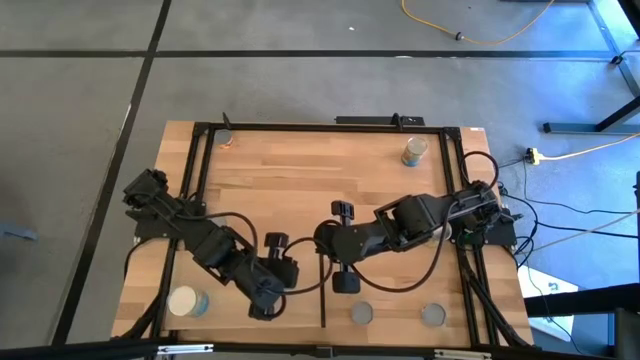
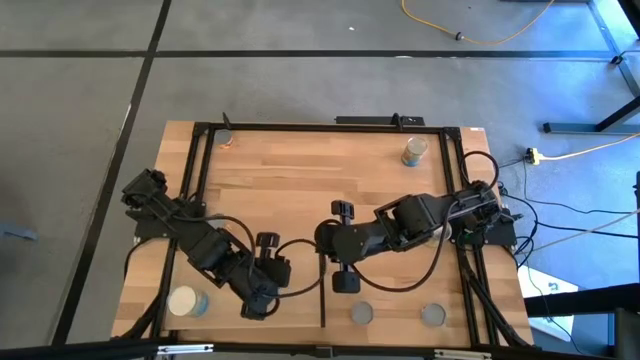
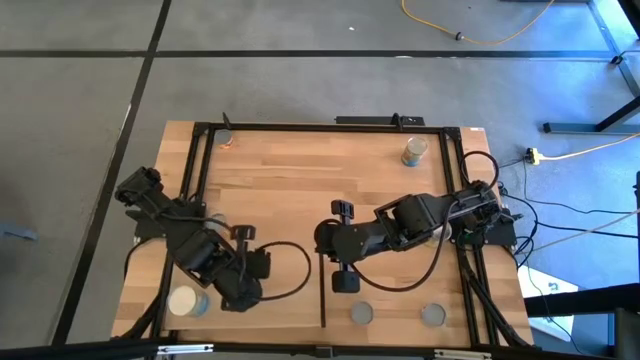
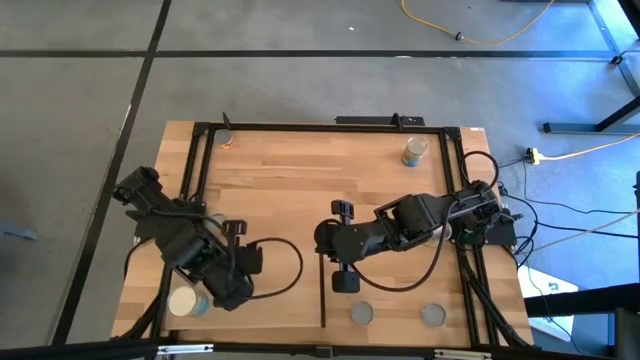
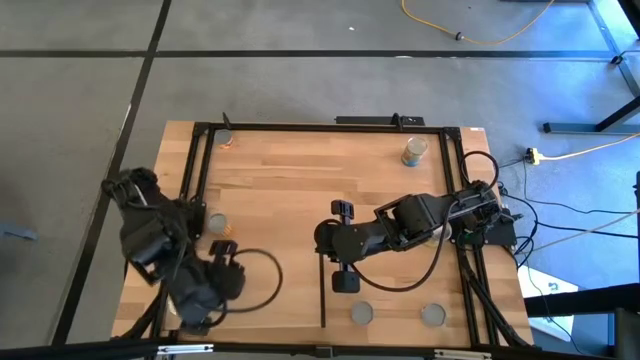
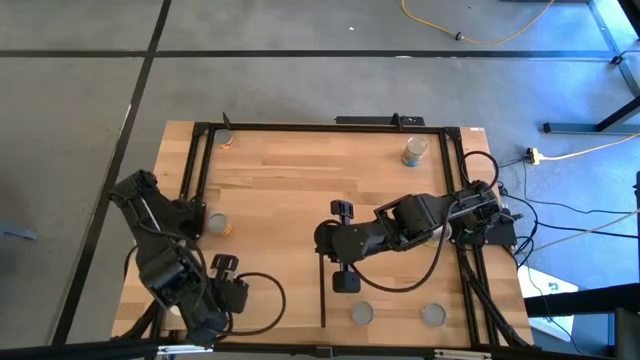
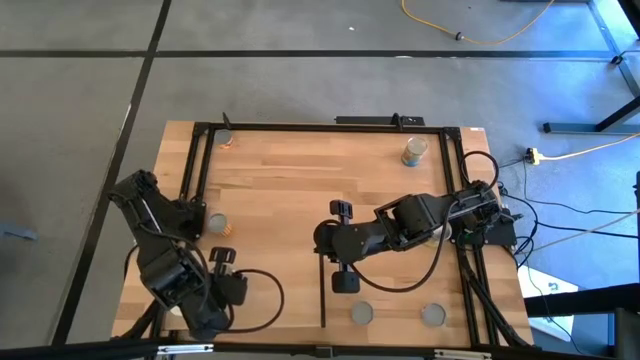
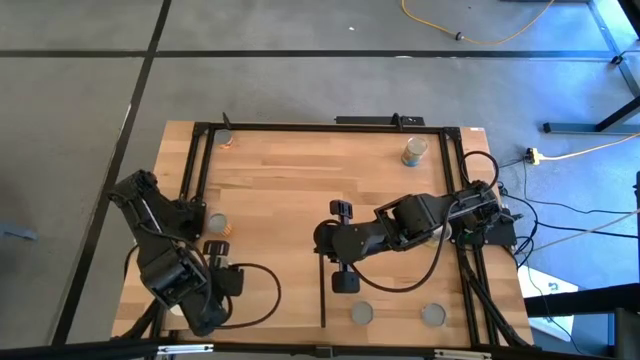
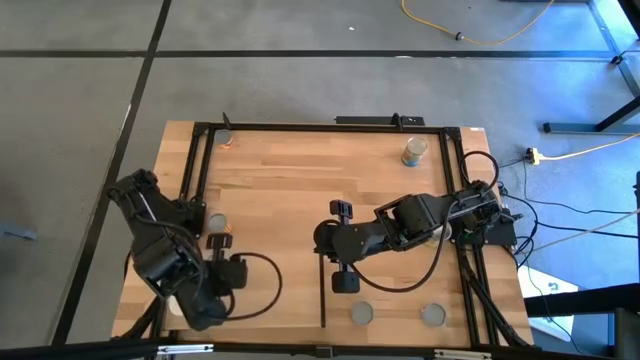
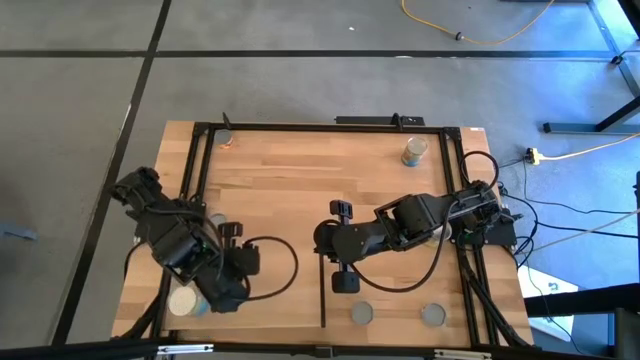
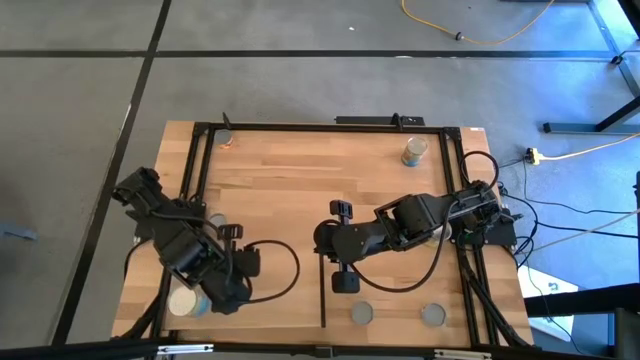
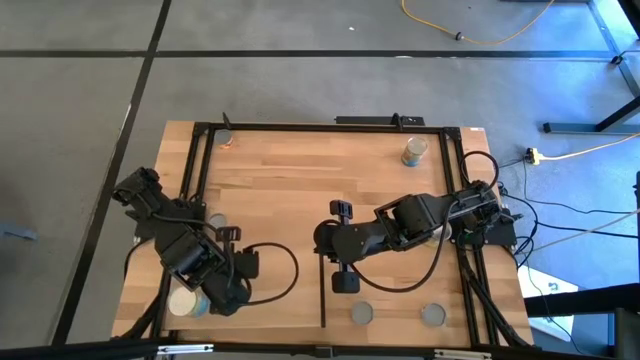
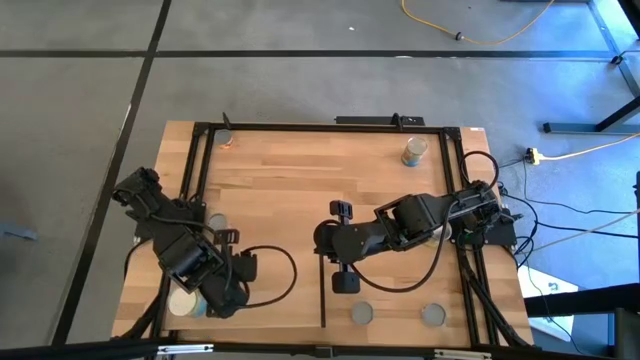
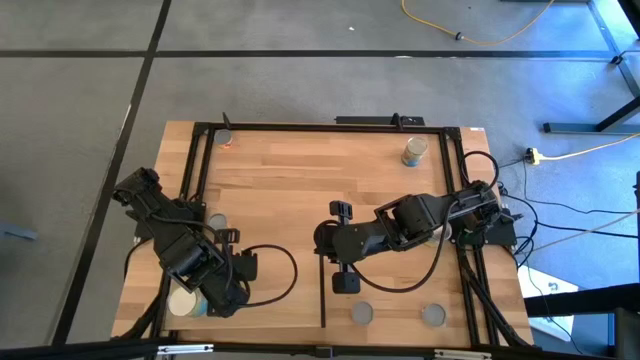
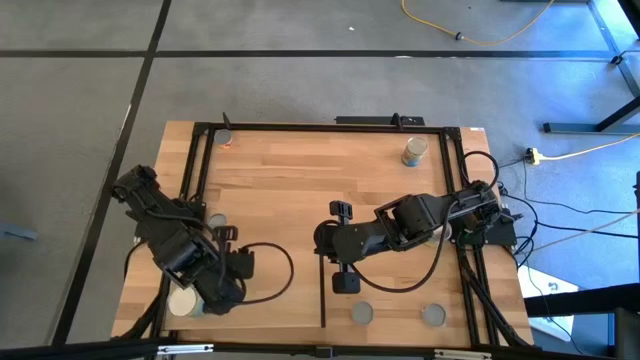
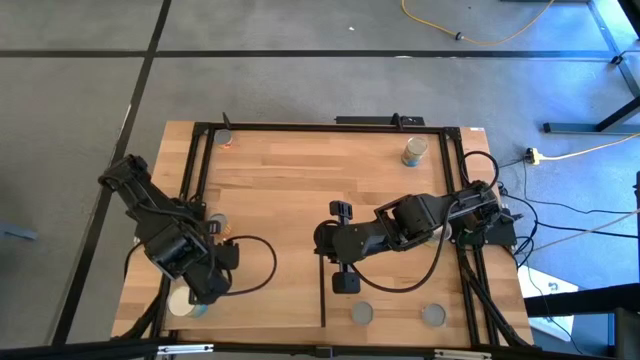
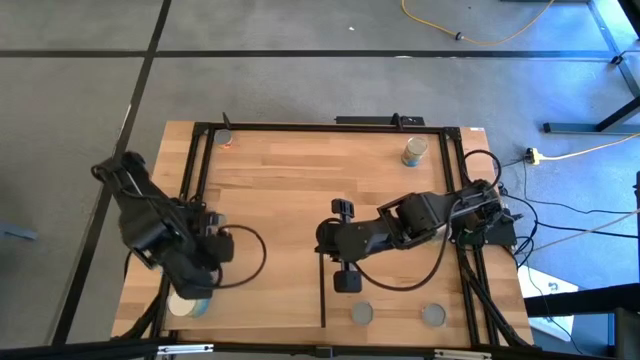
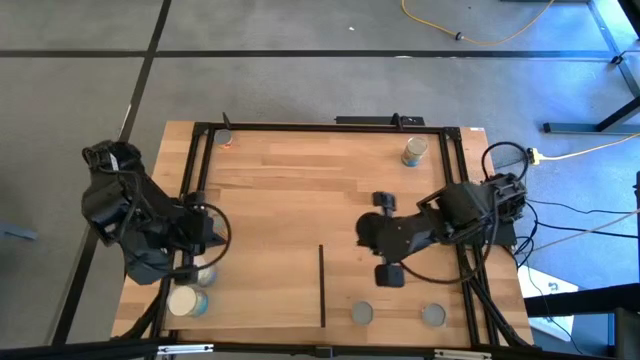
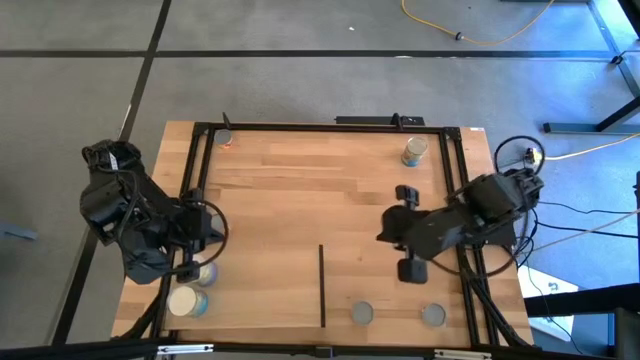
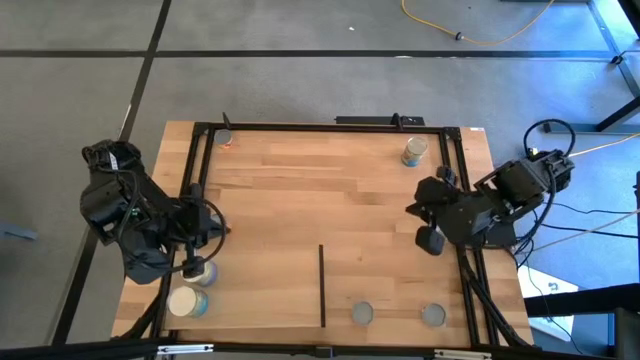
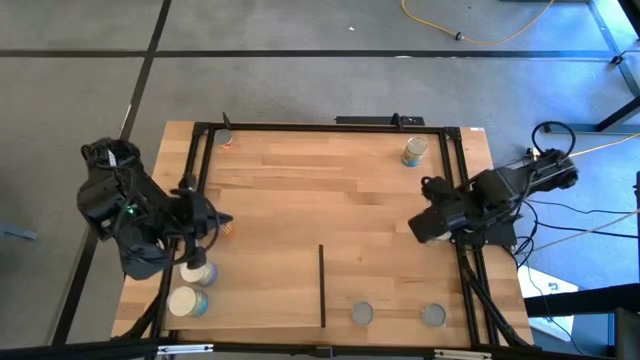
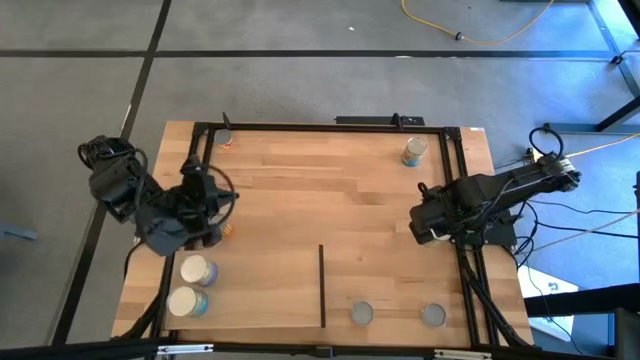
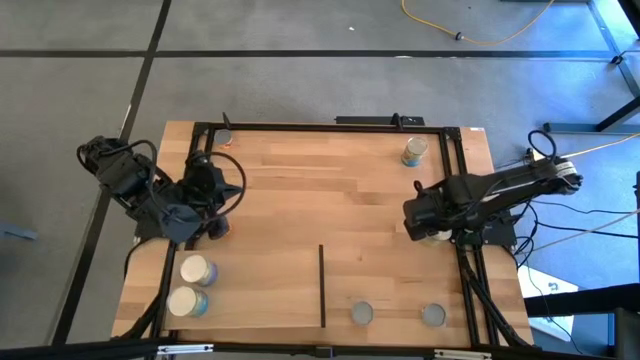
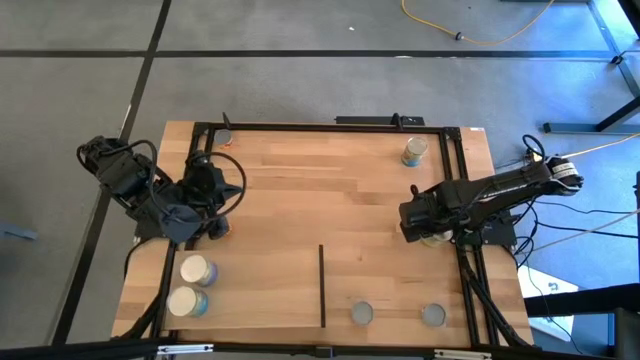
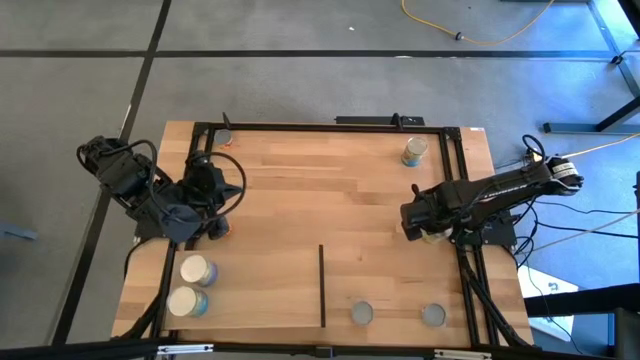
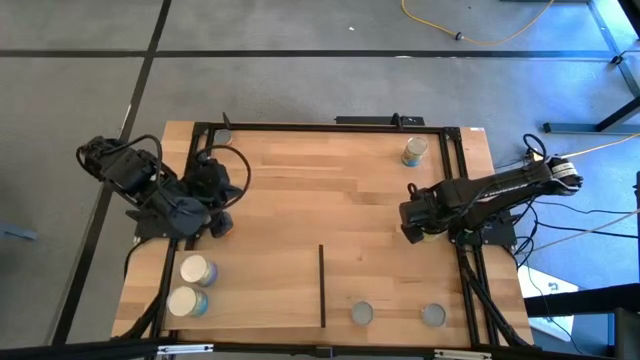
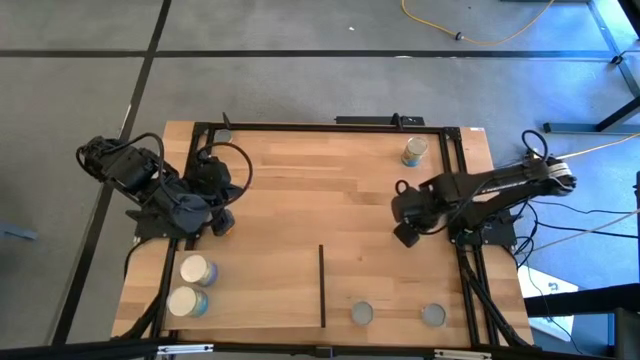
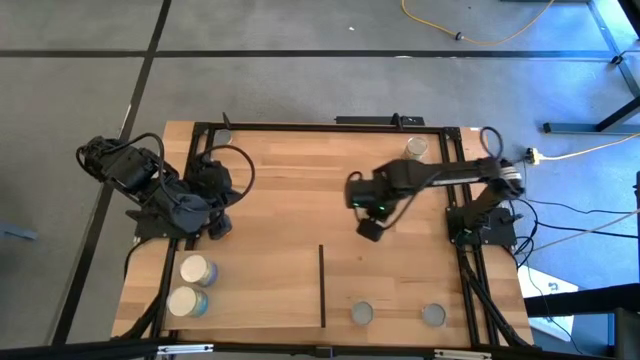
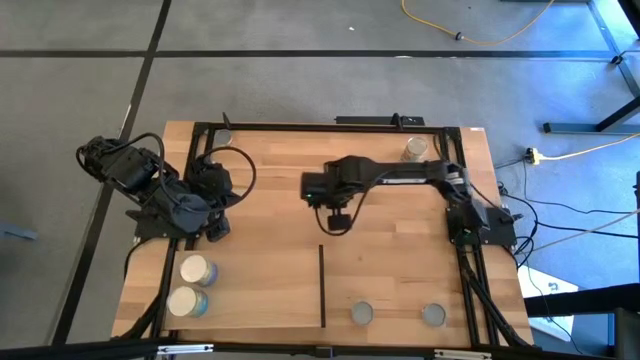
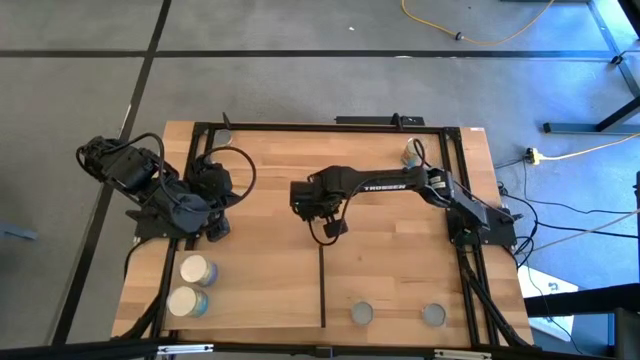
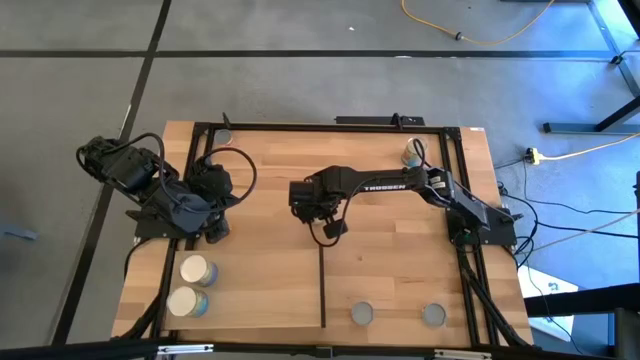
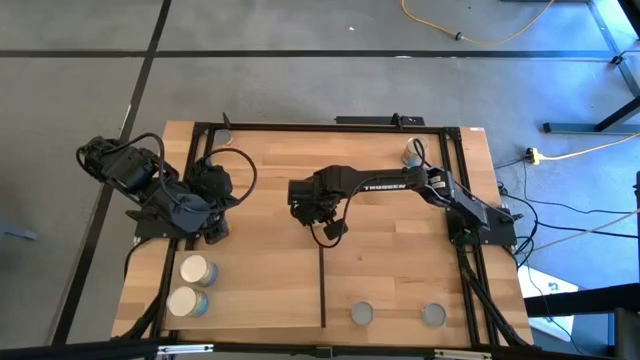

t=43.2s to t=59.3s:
Task: Pick and place cans onto a shelf
Put the canned peas on the shelf

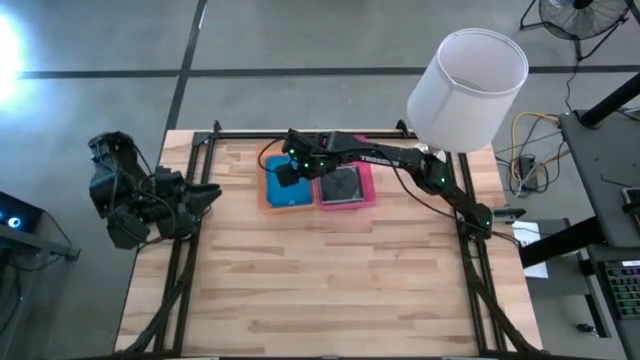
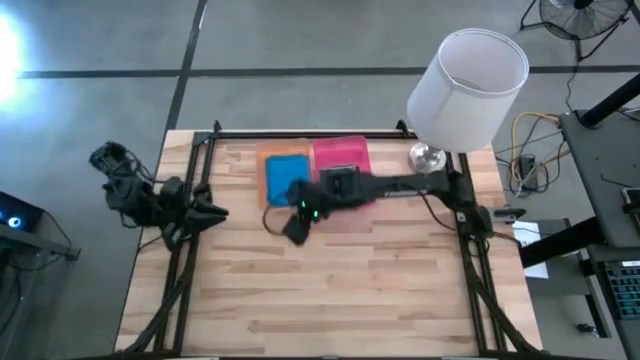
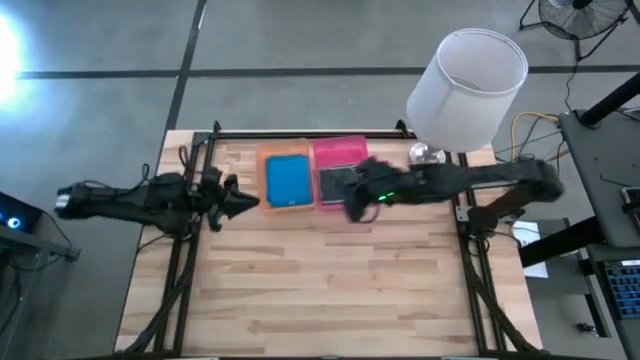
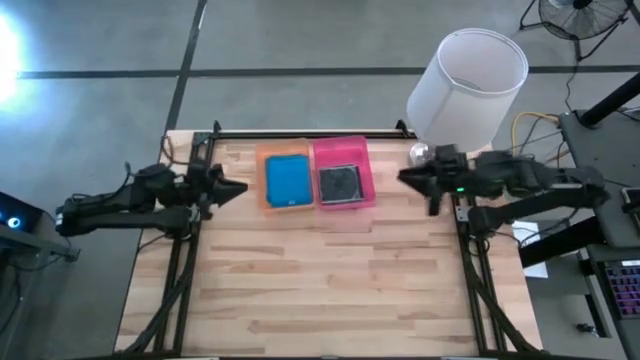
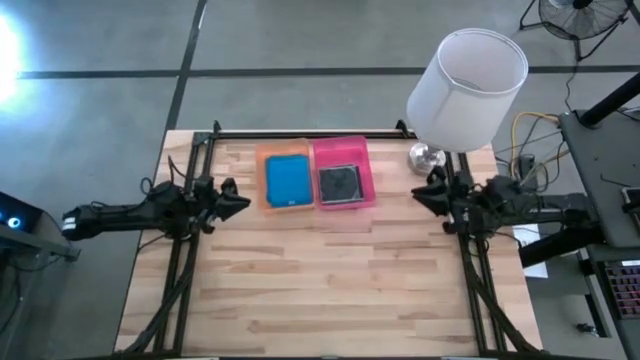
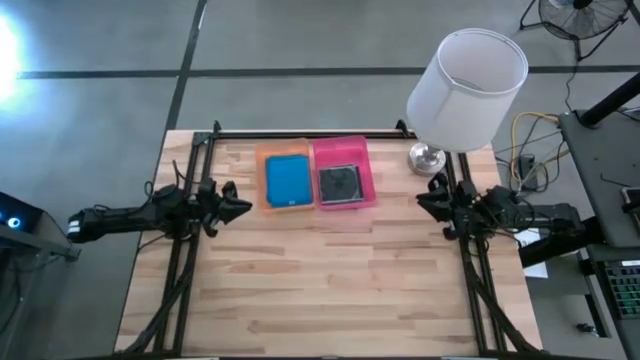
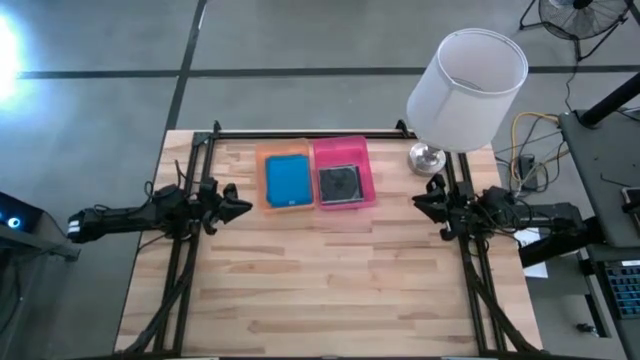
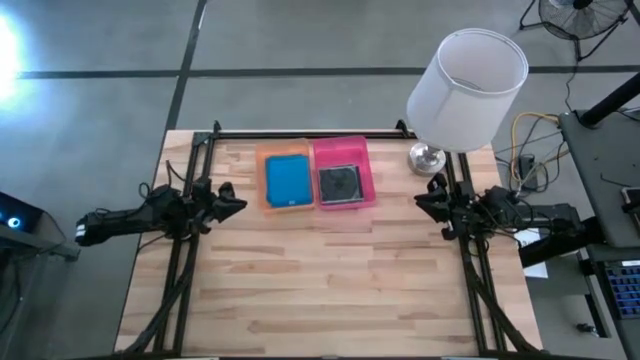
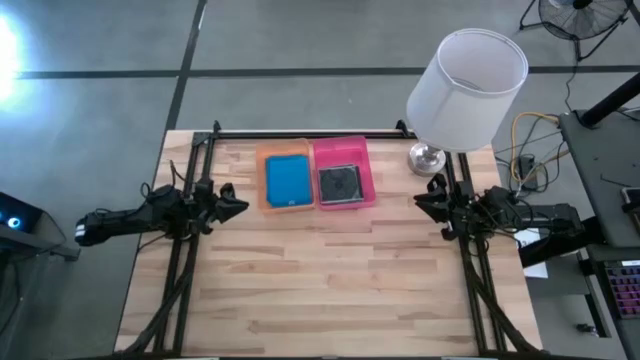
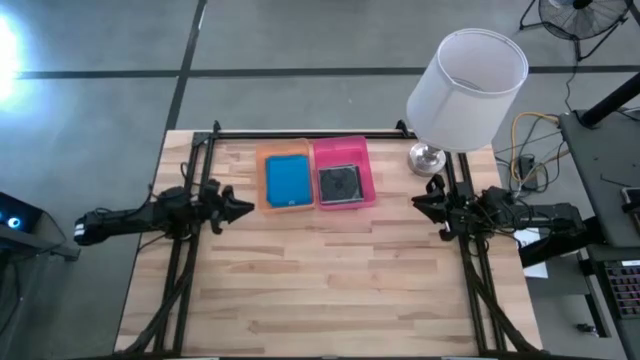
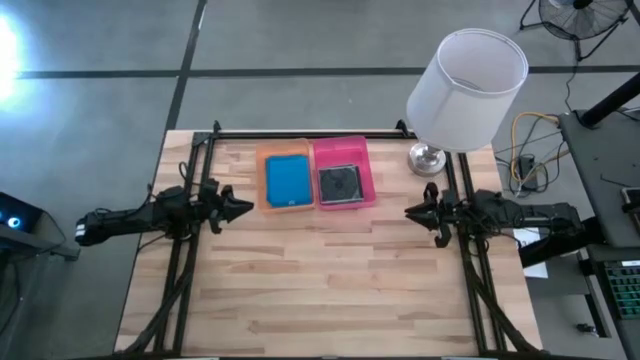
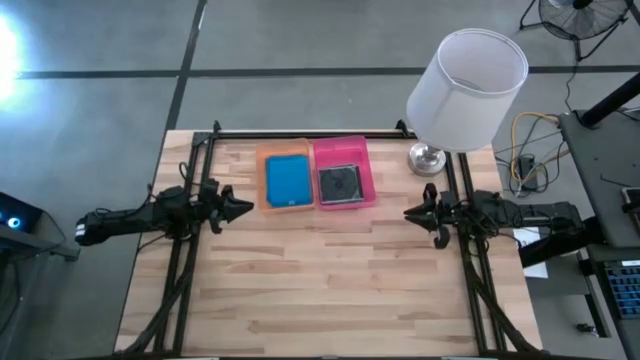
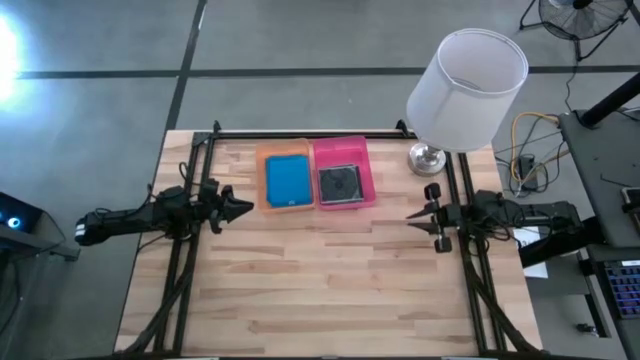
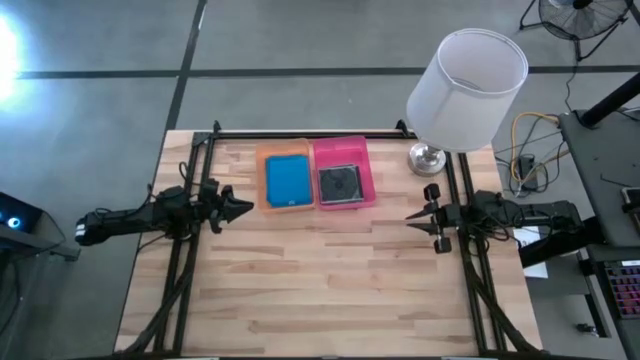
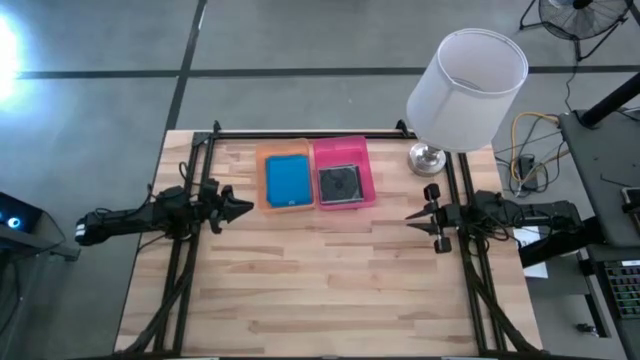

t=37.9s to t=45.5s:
Task: Pick & place jewel cases by type
Return to Home Position
